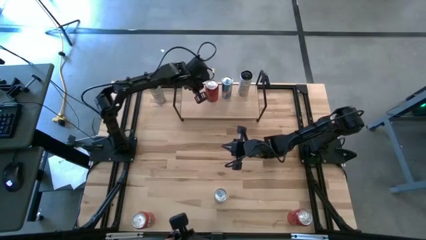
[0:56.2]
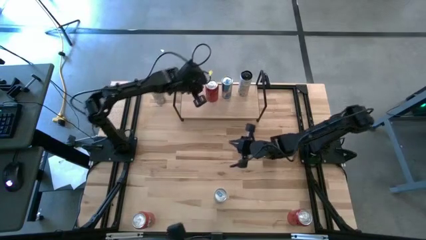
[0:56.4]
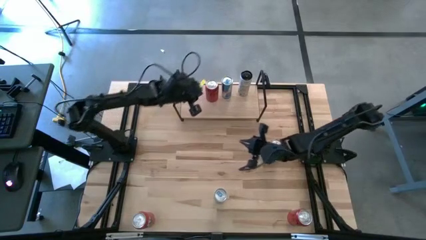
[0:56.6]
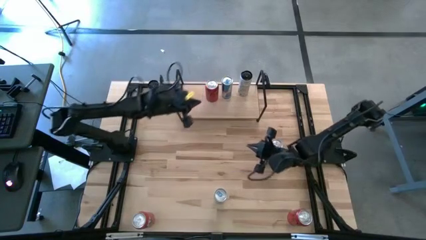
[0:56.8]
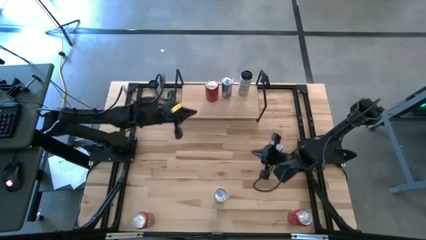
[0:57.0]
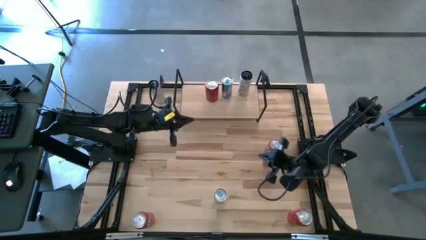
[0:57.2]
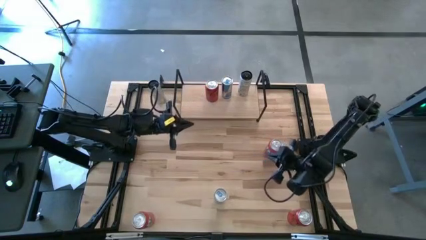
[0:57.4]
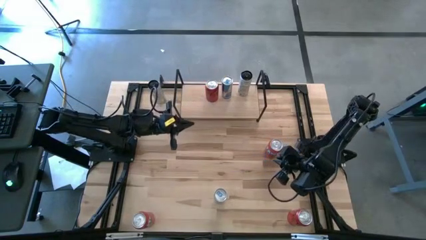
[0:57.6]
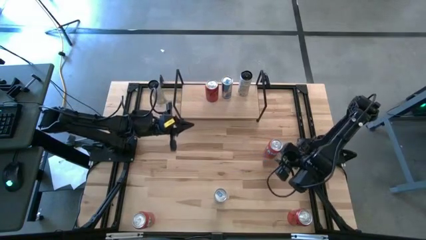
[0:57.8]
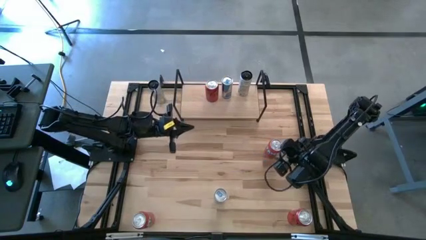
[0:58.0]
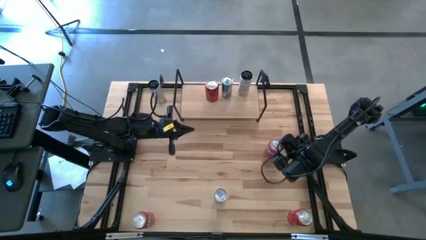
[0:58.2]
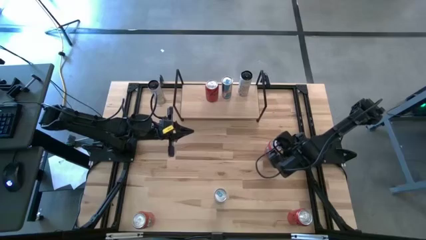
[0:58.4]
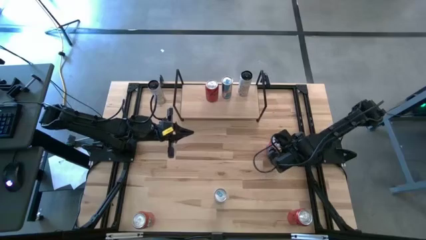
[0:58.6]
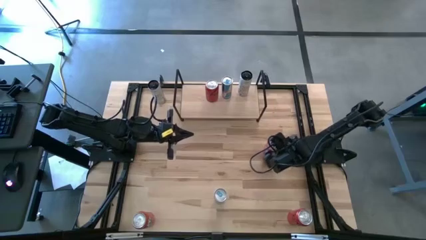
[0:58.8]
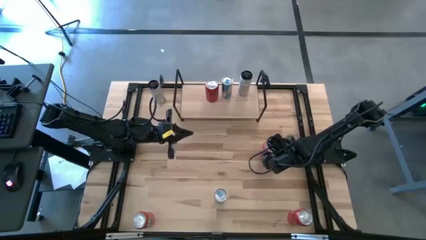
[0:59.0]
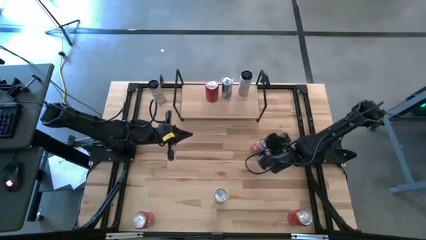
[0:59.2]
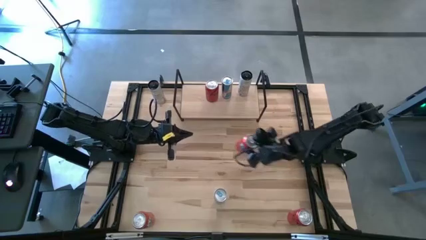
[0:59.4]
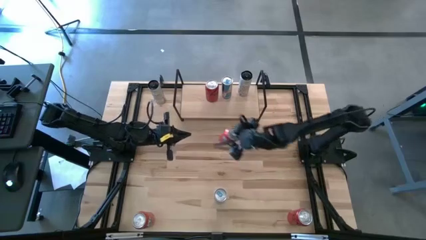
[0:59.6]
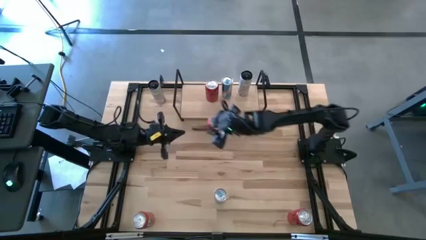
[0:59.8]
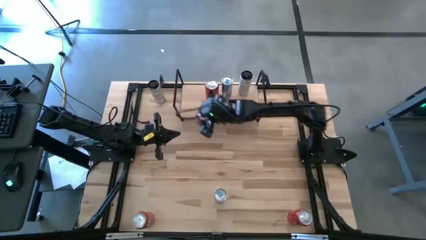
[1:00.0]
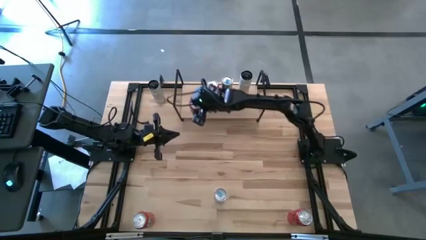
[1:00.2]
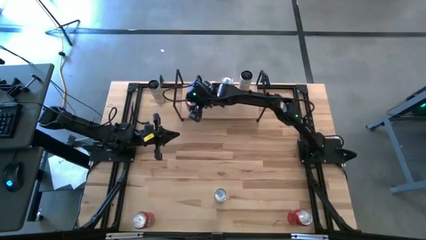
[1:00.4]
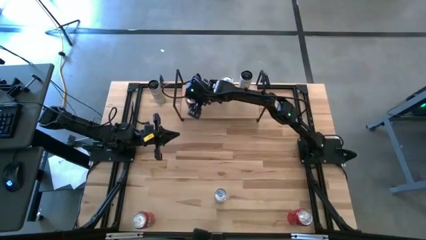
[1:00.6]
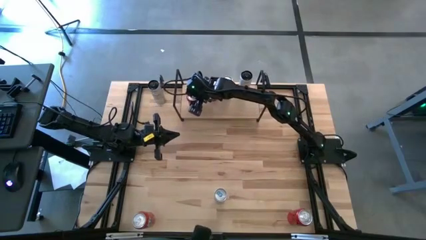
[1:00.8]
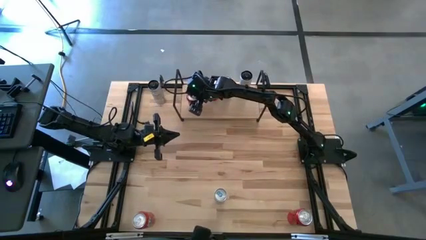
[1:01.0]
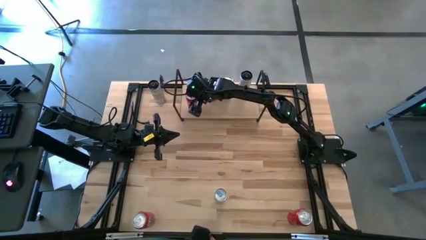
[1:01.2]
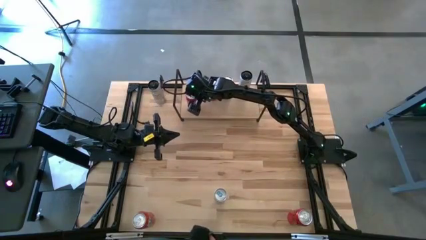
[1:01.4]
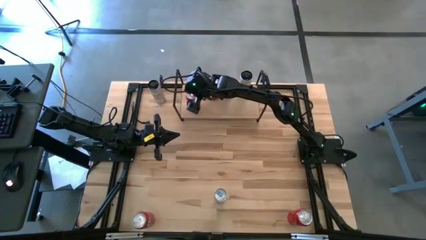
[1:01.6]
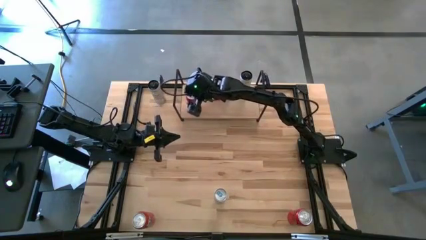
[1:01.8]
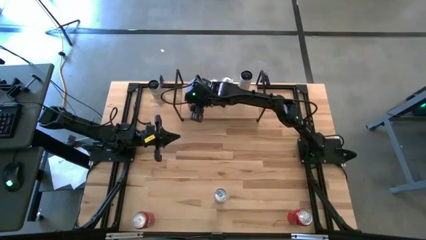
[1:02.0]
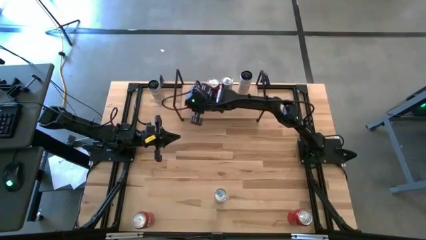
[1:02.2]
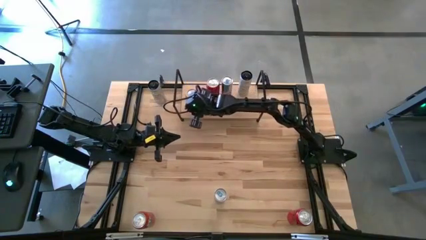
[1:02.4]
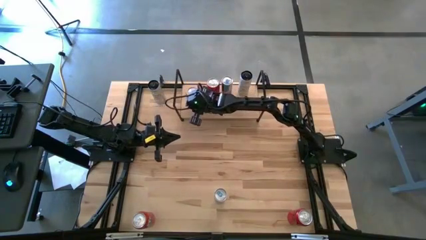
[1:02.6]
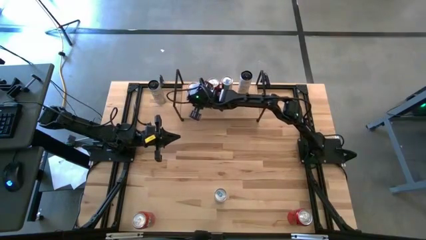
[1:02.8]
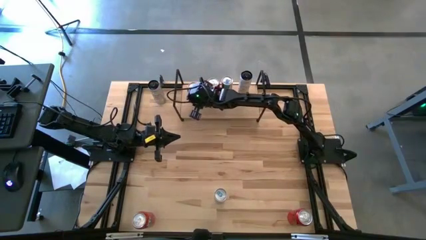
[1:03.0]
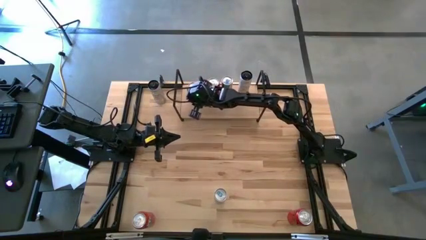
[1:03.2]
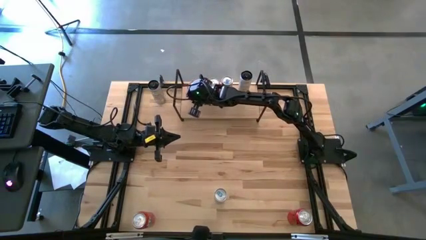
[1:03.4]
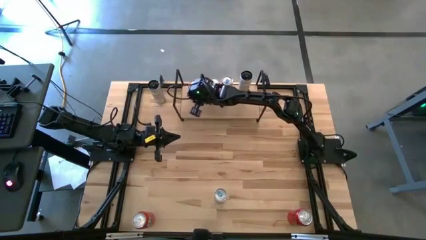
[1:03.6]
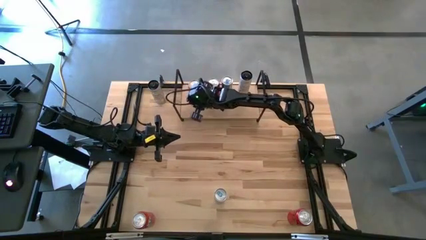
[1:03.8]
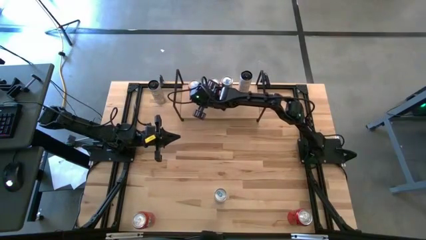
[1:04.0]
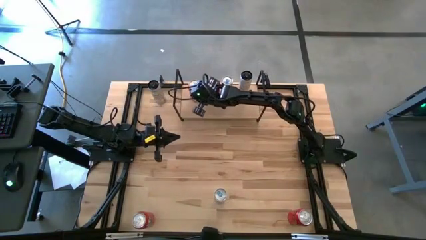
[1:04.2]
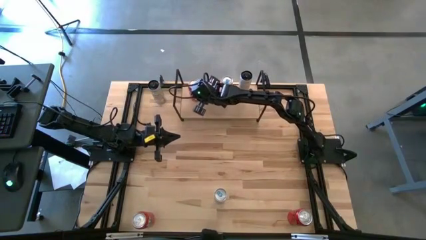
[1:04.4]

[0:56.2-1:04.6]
Task: Place canned beverage on shelf
Put the right red soda can on the shelf

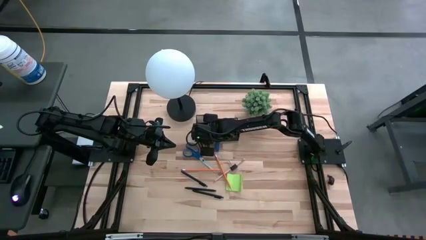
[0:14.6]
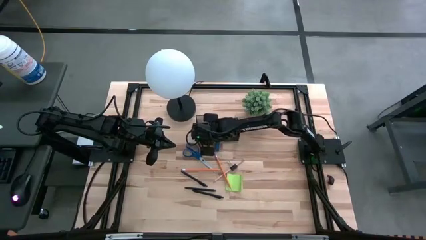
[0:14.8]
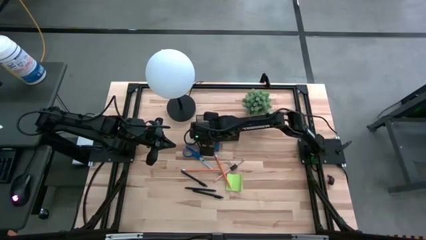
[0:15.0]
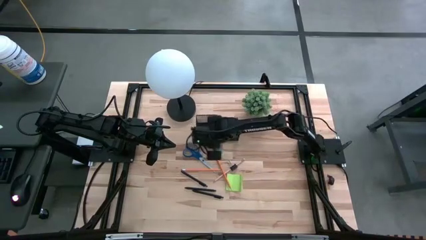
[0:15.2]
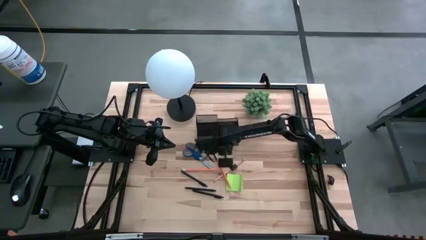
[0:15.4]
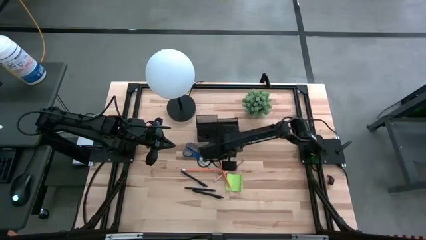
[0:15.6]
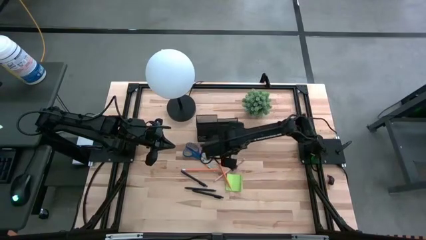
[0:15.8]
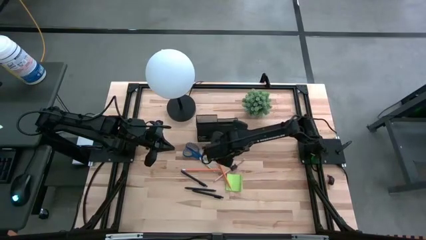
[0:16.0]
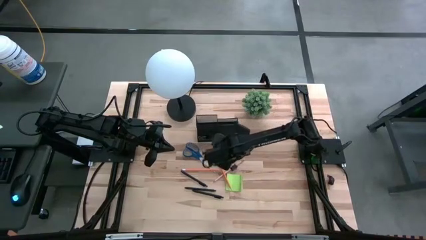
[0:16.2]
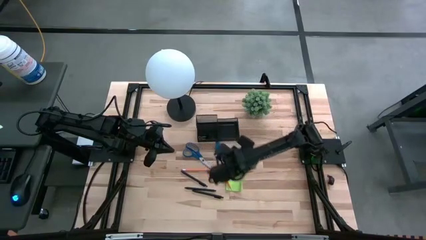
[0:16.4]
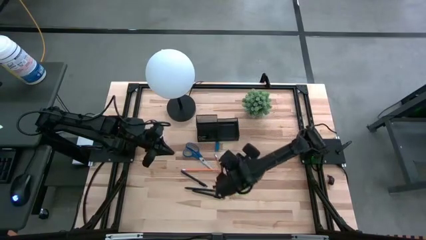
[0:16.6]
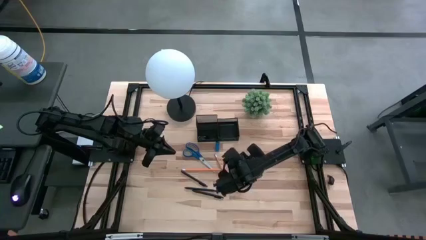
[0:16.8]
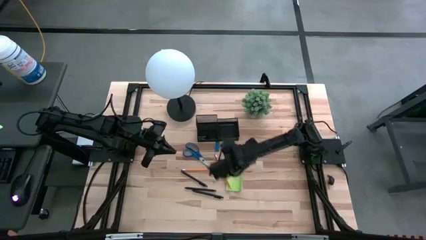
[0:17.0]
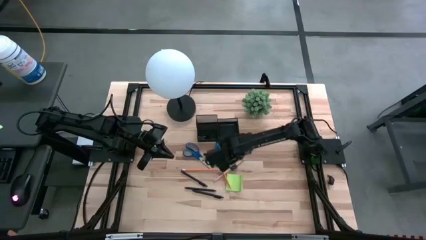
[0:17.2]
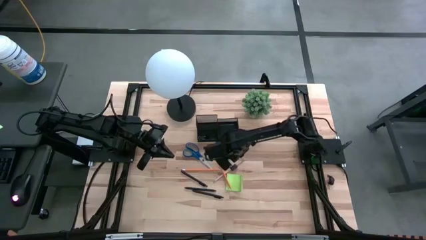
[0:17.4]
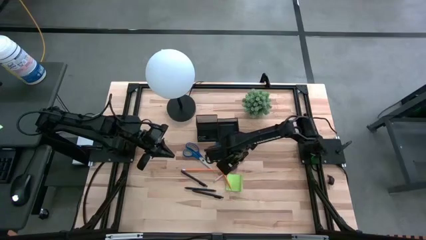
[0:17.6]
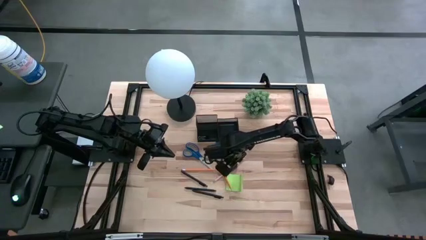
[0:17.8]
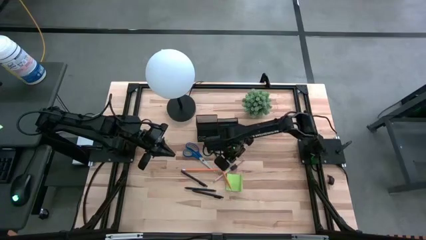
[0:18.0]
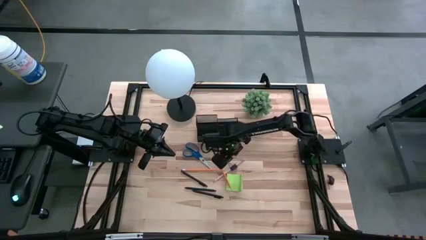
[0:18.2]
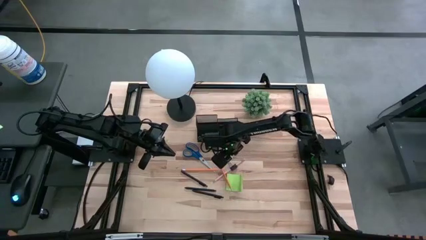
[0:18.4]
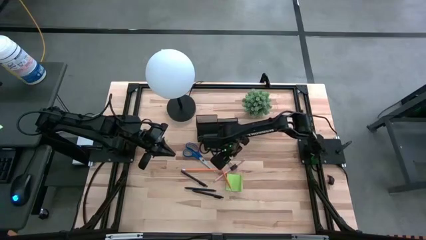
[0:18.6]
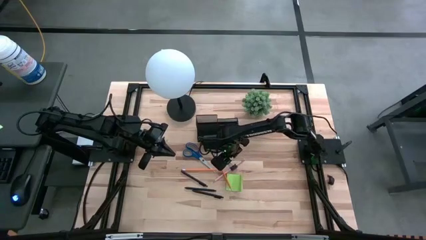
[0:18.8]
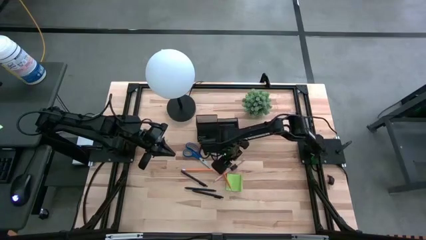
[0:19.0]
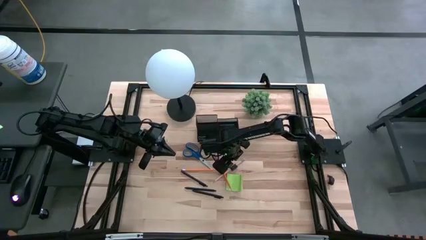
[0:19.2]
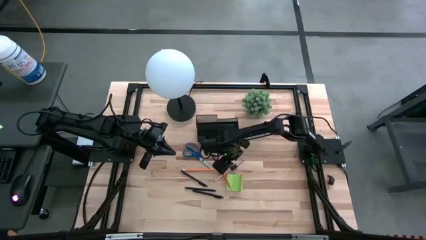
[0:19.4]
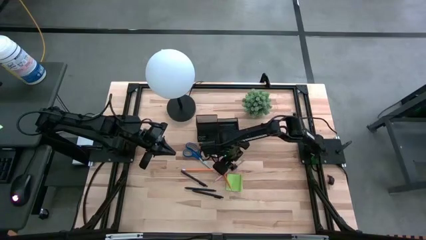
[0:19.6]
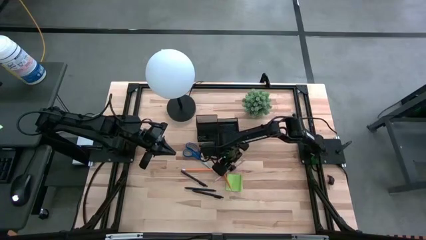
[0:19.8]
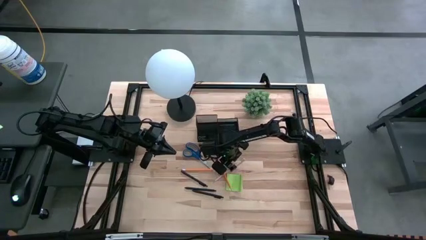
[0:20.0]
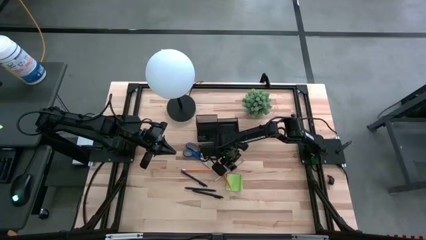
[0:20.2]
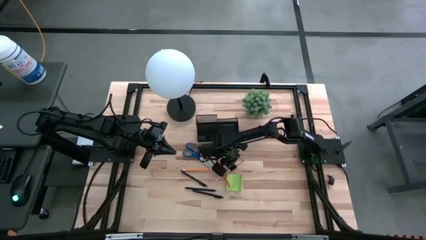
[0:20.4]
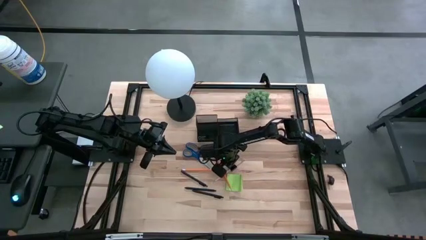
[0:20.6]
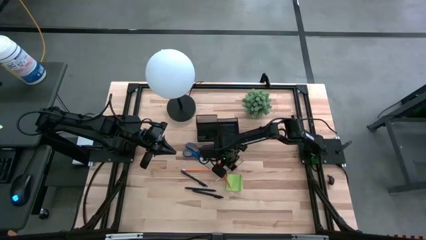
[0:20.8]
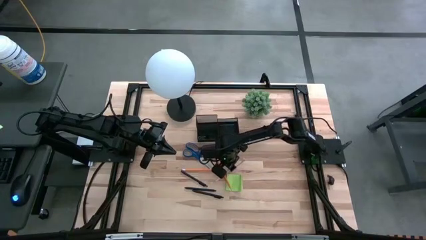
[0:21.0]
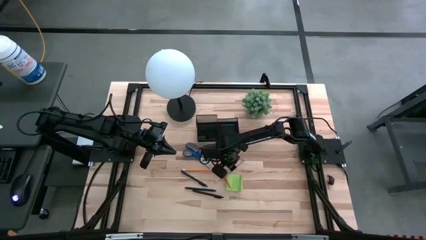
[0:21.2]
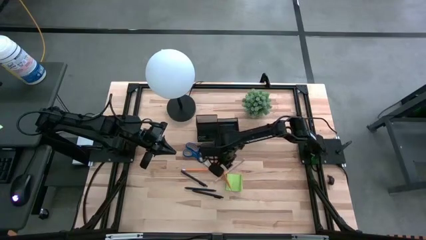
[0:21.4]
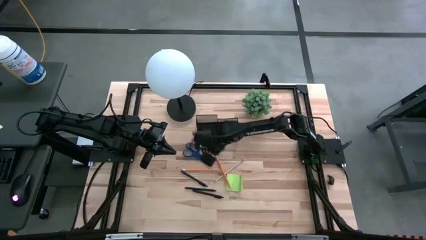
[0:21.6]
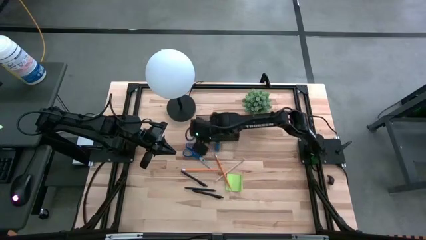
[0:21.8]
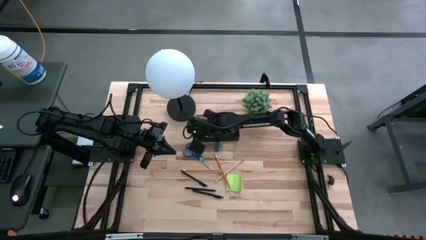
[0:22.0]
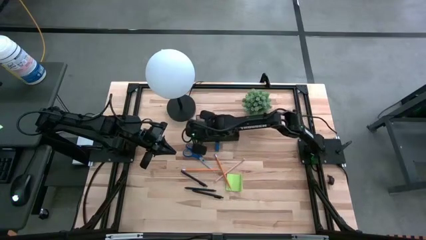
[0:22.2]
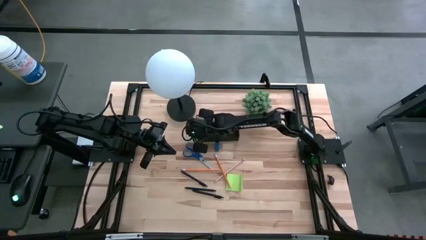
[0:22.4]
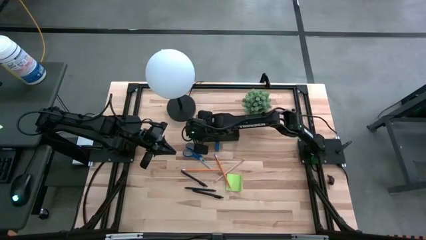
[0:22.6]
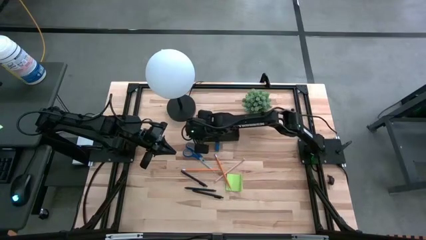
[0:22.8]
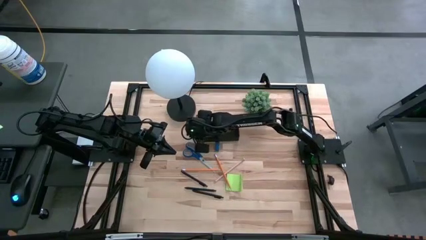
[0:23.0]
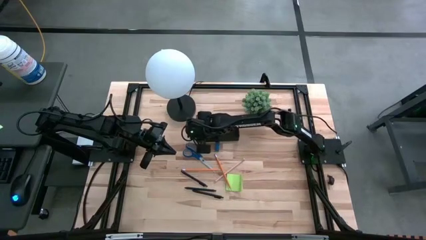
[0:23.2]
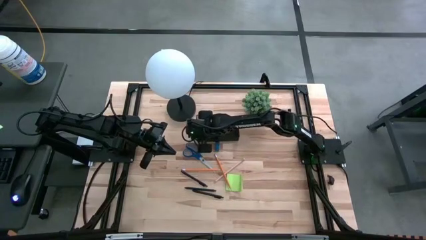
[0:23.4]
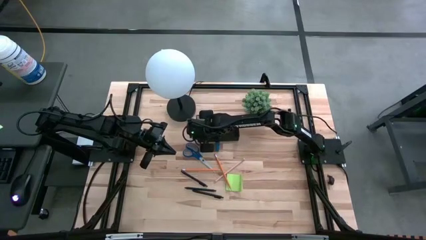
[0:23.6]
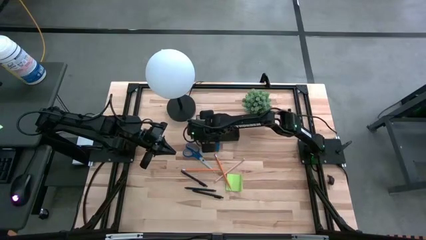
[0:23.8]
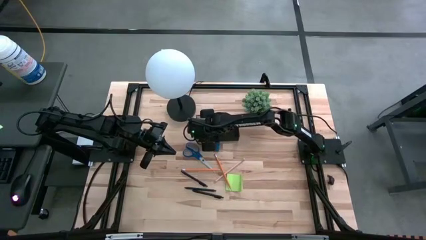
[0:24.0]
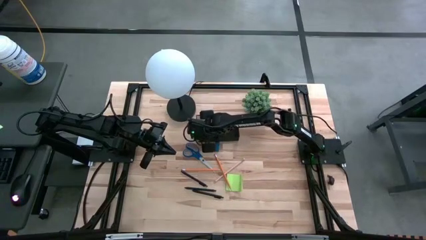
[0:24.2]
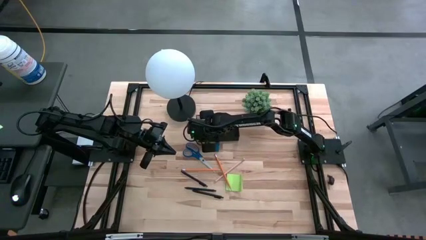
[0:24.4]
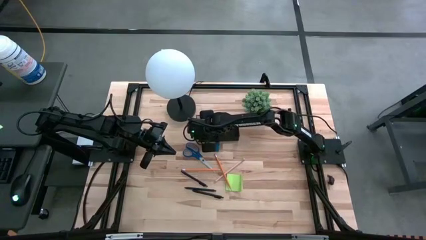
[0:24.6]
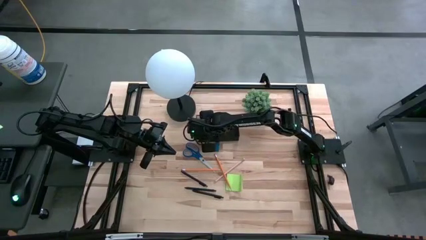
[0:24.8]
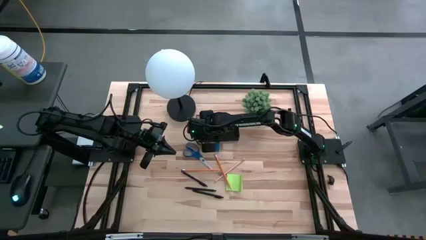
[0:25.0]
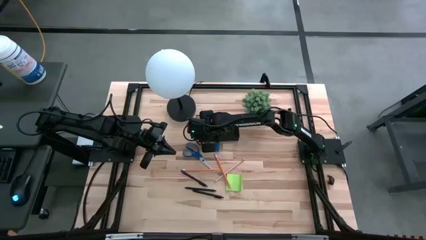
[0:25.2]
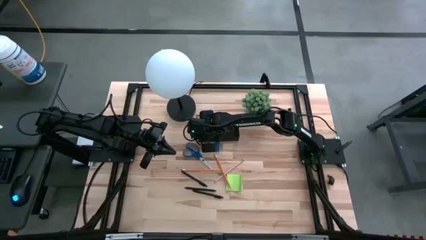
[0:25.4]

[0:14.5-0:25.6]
Task: Pick and place office supplies into organizer
Put the black binder clip into the desk organizer
